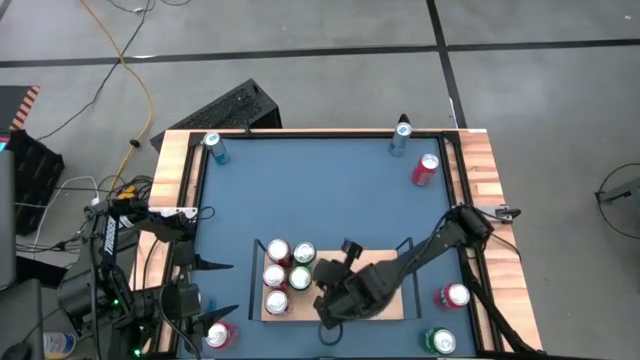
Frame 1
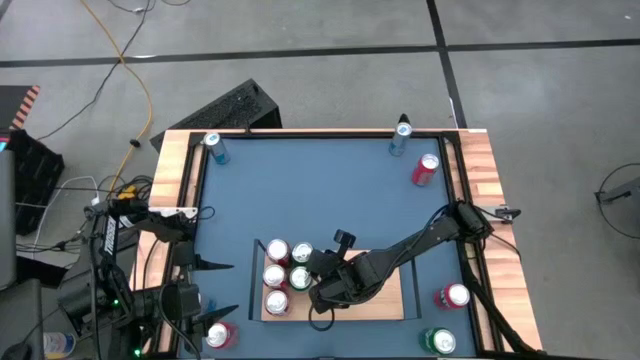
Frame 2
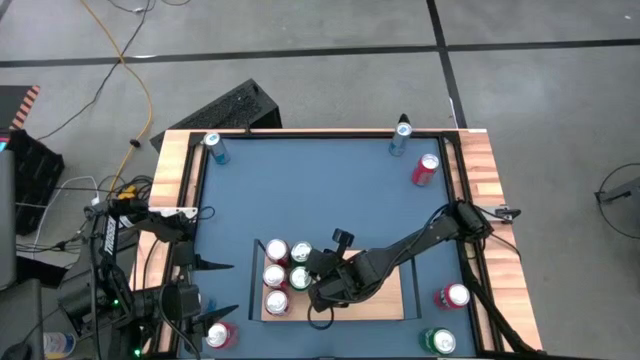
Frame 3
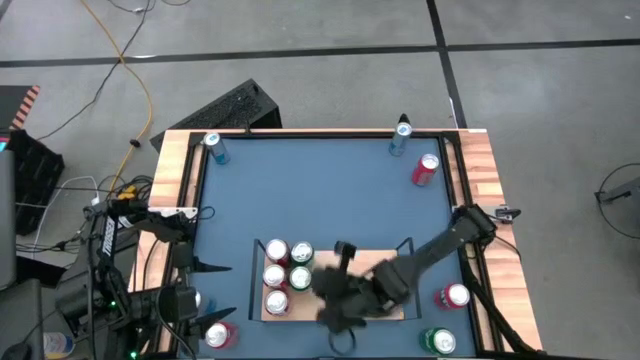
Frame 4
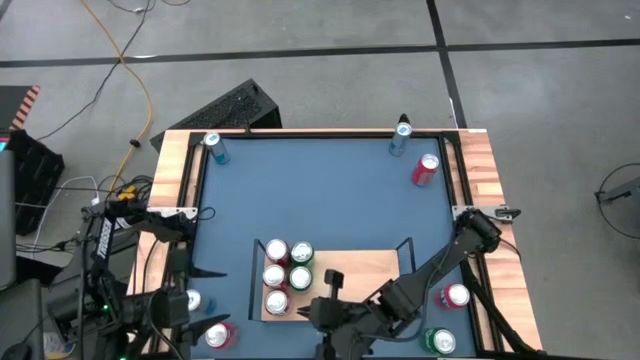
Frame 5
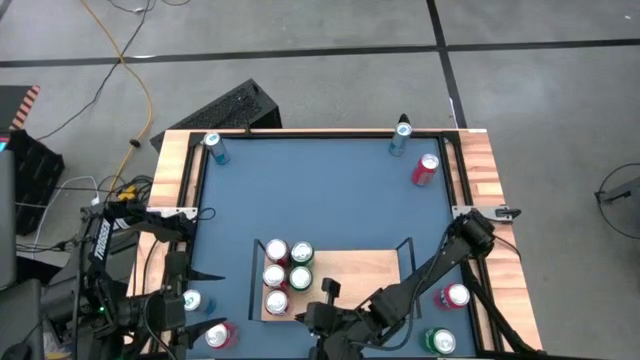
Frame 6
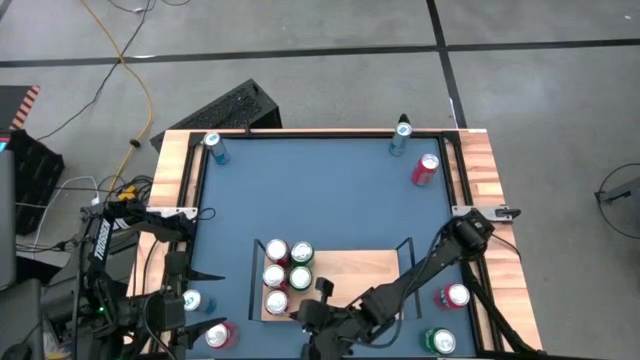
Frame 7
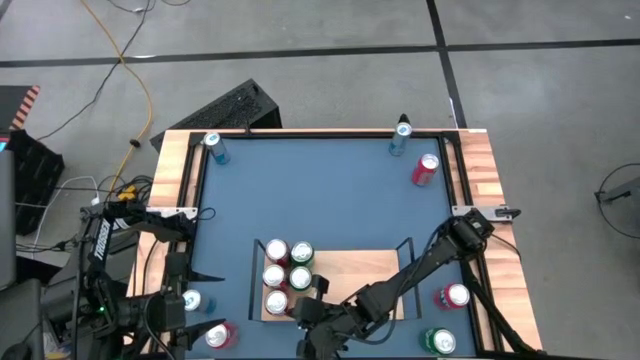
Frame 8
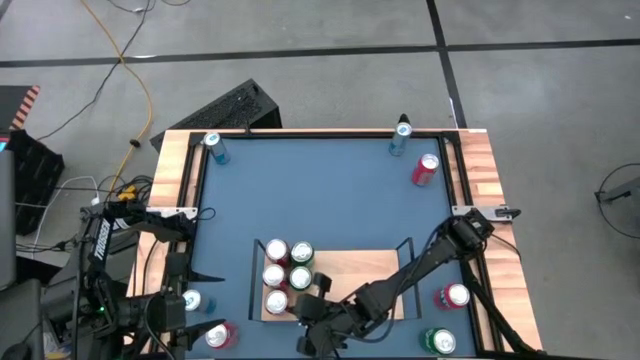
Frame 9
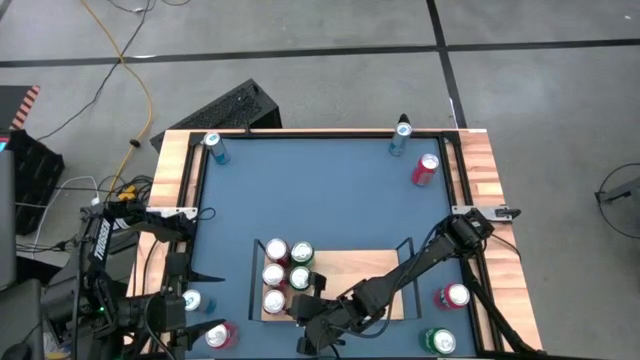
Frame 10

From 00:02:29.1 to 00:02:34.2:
Task: Place canned beverage on shelf
Adjust the soda cans on the shelf

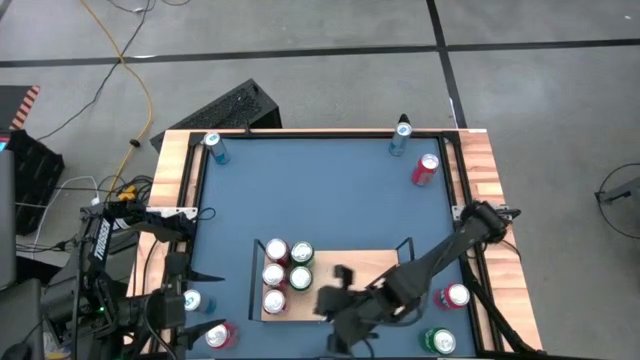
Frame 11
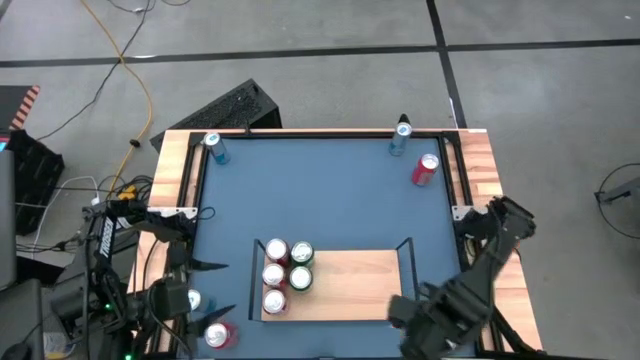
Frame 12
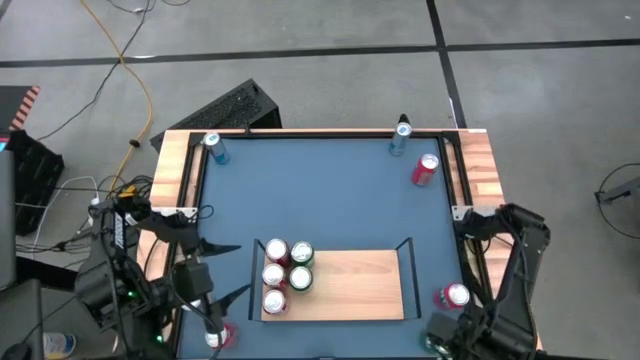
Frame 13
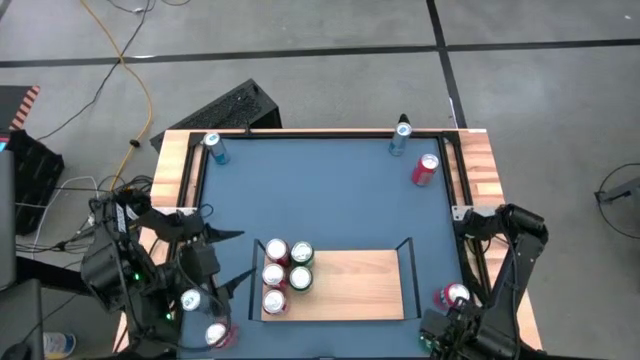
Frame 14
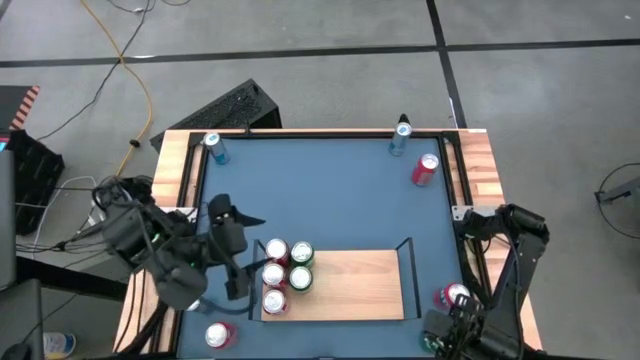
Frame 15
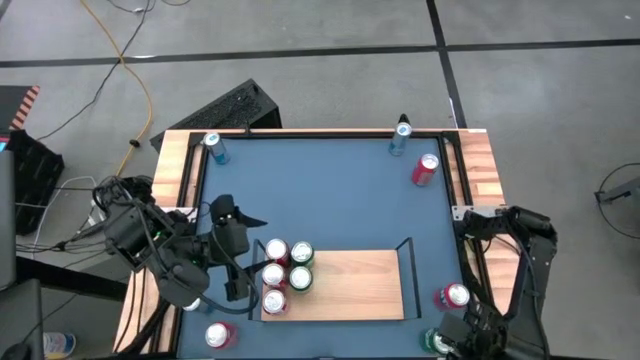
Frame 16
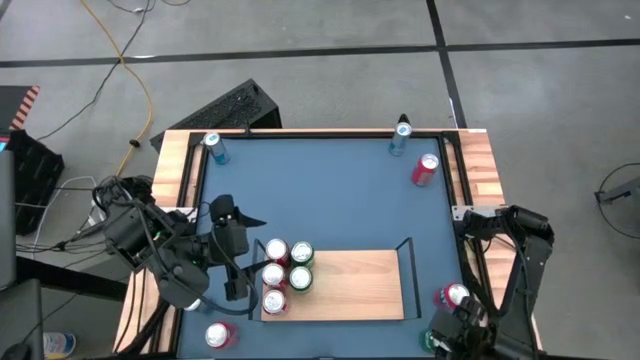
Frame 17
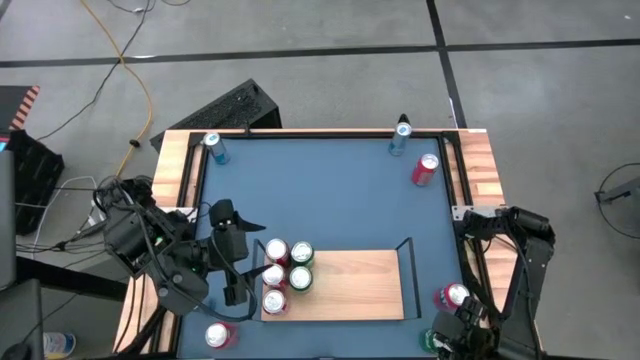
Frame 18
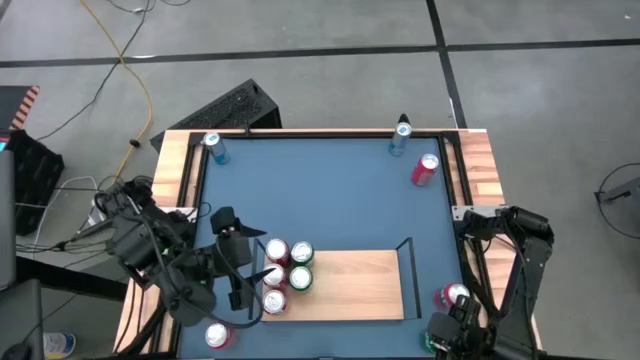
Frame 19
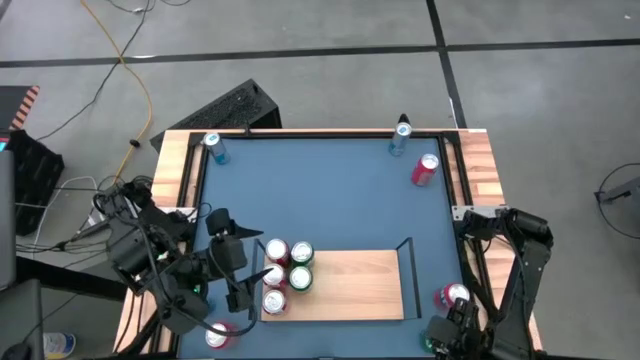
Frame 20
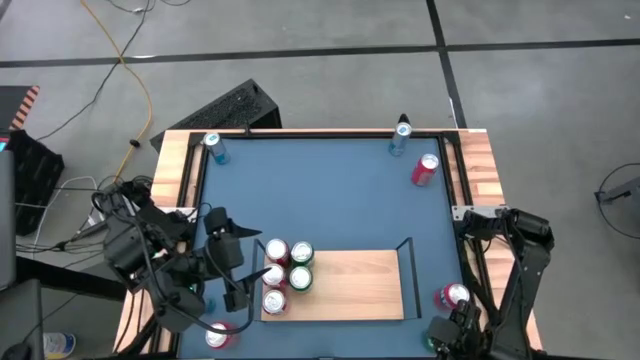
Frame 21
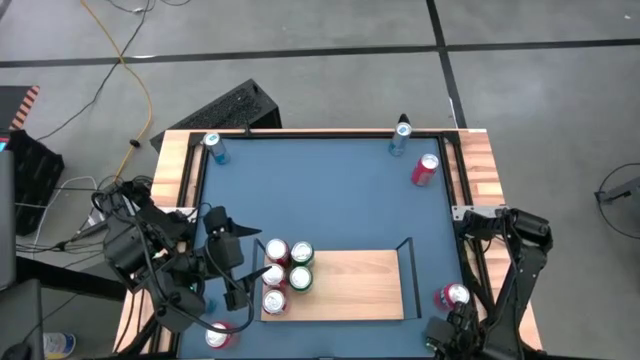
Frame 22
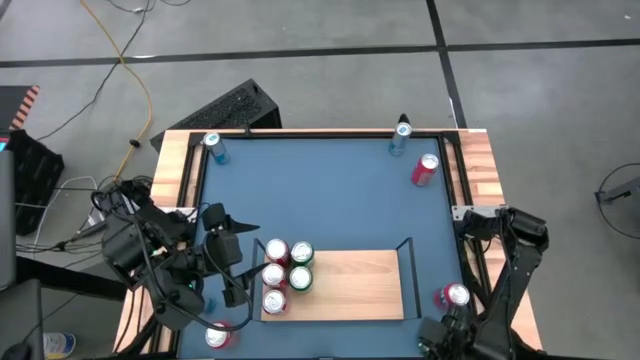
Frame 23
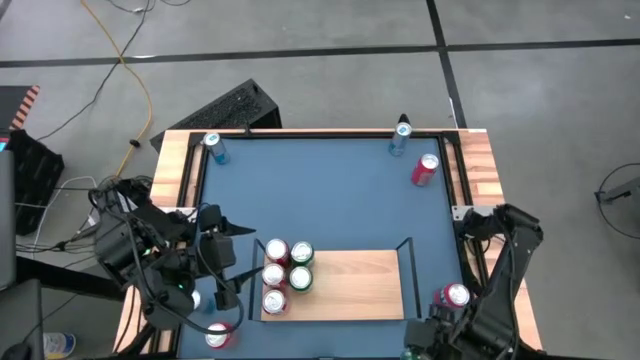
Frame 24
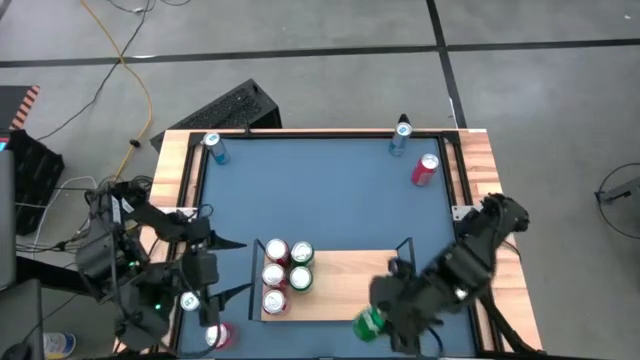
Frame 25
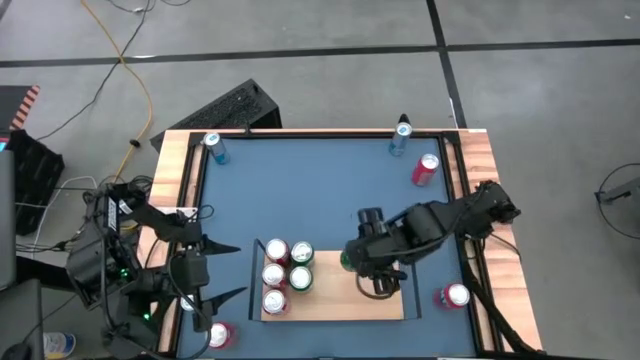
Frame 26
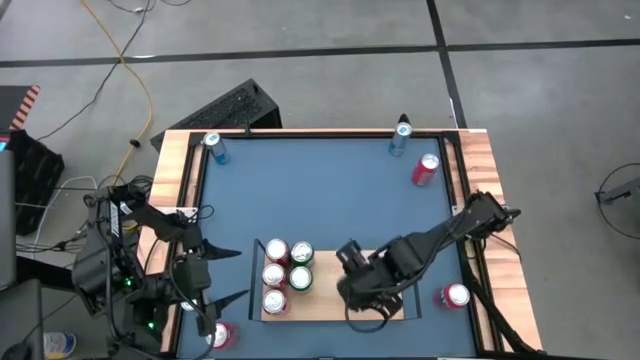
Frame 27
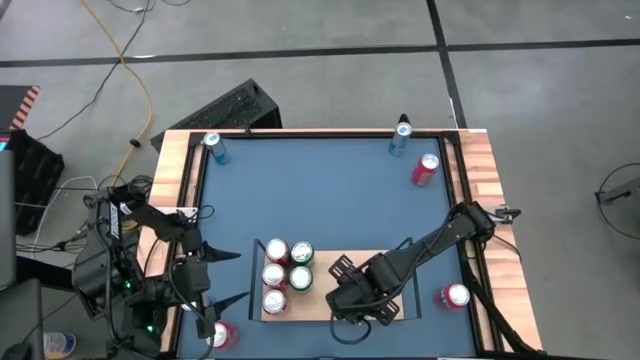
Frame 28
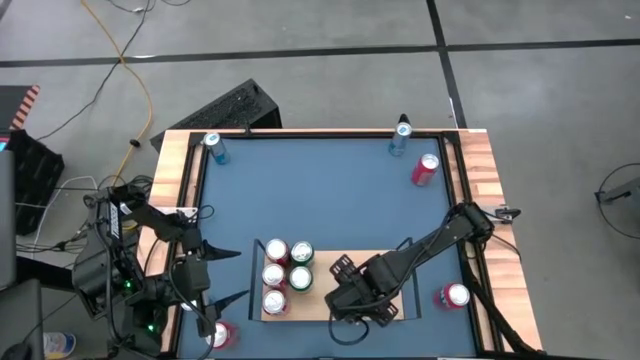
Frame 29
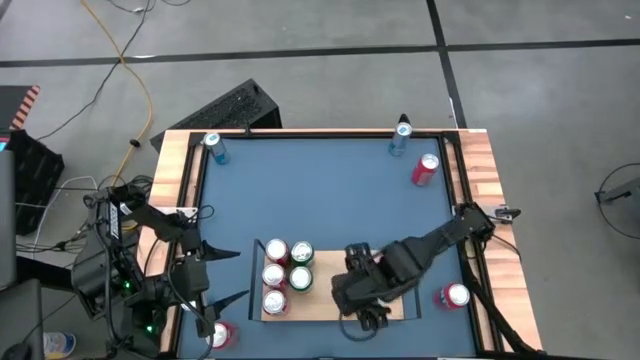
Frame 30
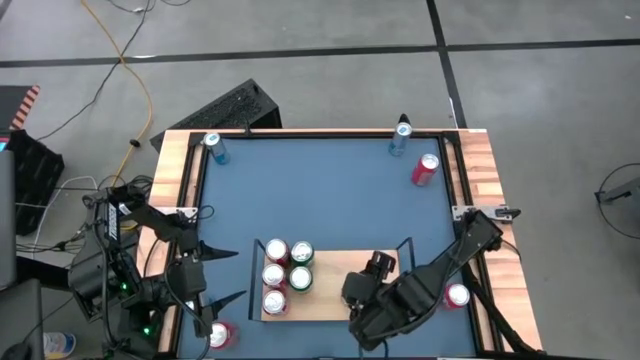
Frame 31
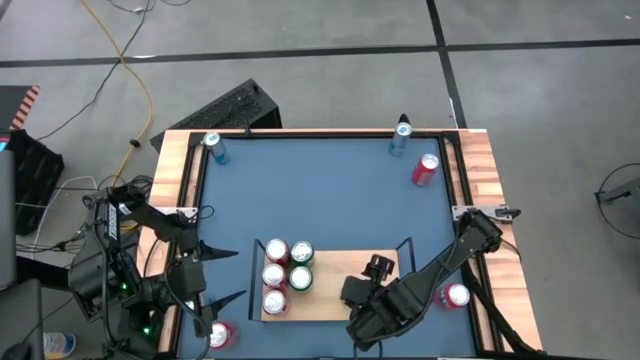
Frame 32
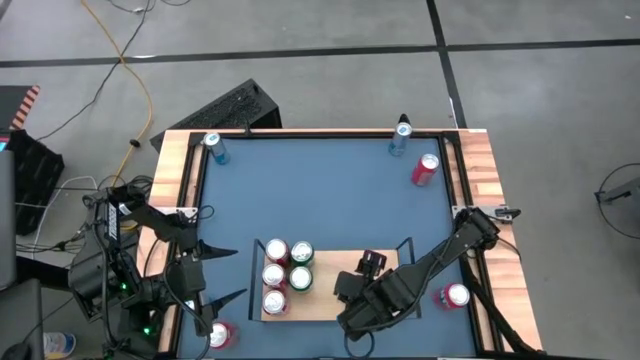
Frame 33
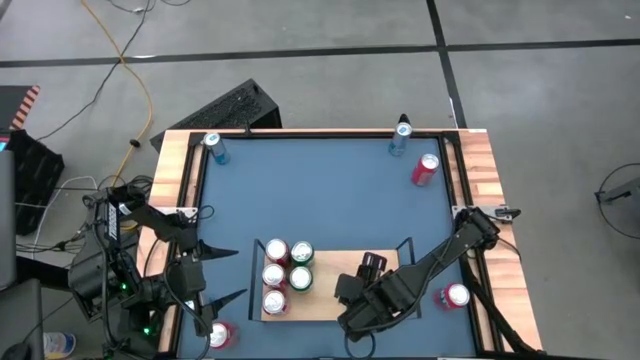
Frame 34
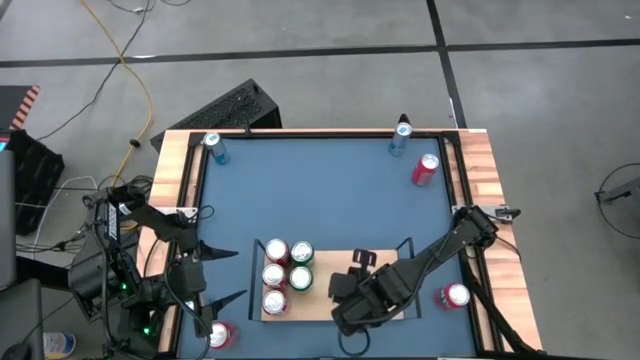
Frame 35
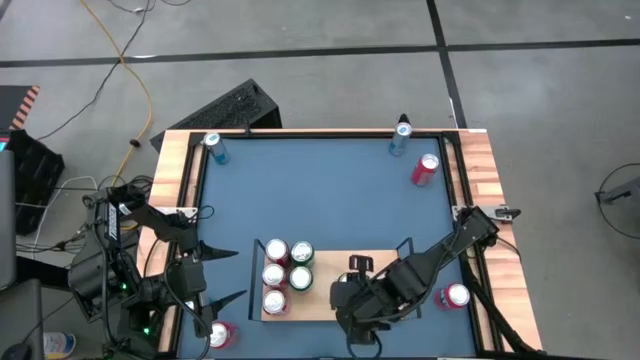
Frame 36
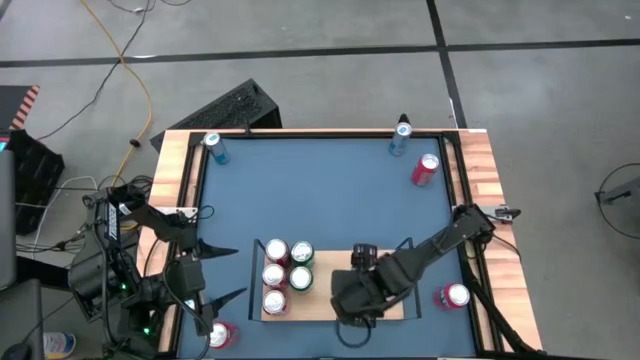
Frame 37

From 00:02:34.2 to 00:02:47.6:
Put the green soda can on the shelf aligned with the other green soda can

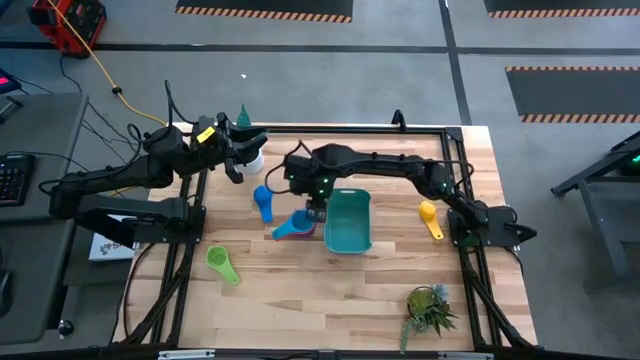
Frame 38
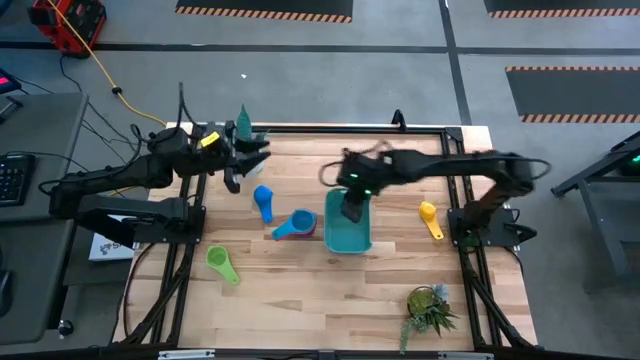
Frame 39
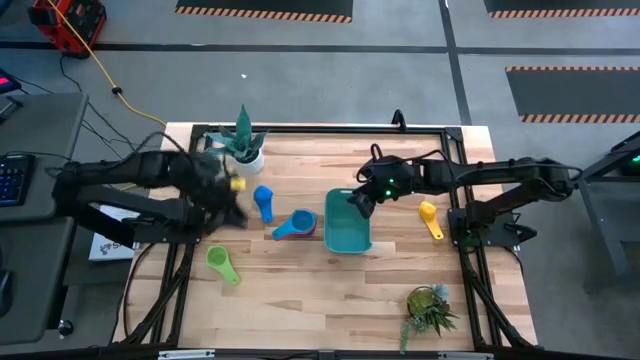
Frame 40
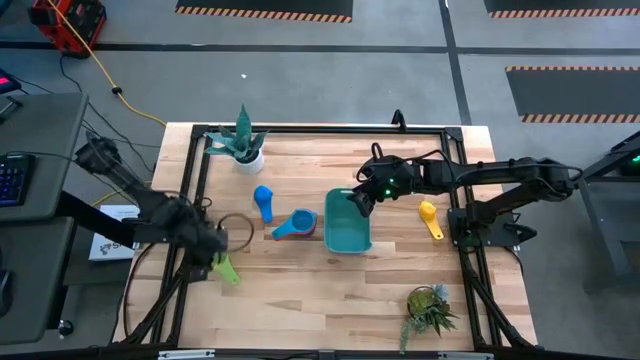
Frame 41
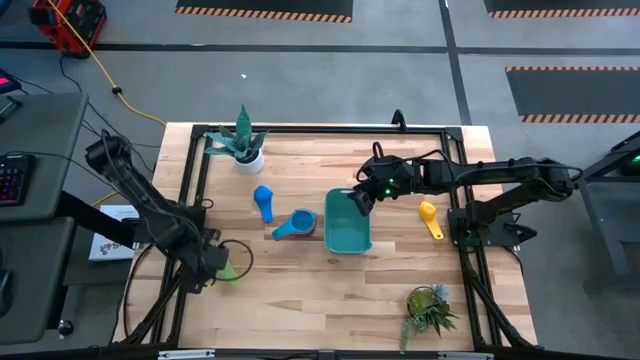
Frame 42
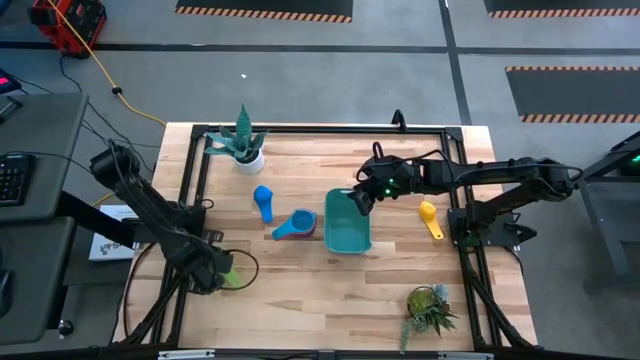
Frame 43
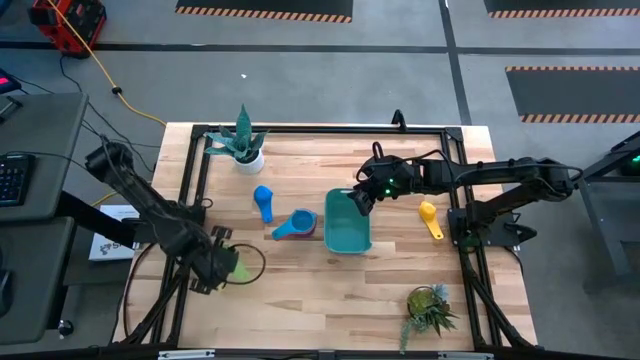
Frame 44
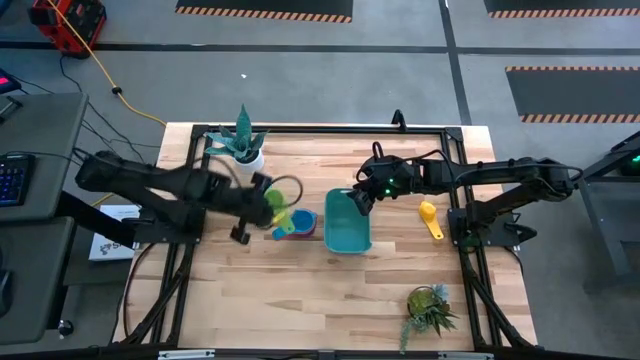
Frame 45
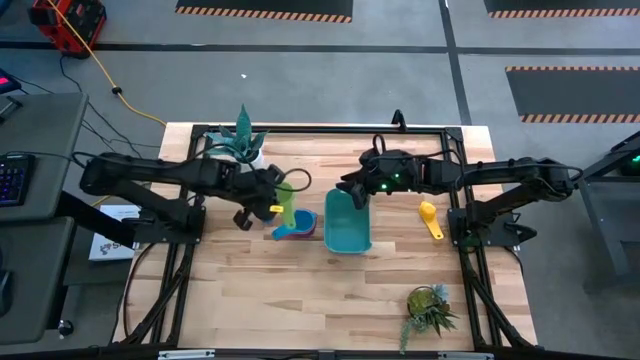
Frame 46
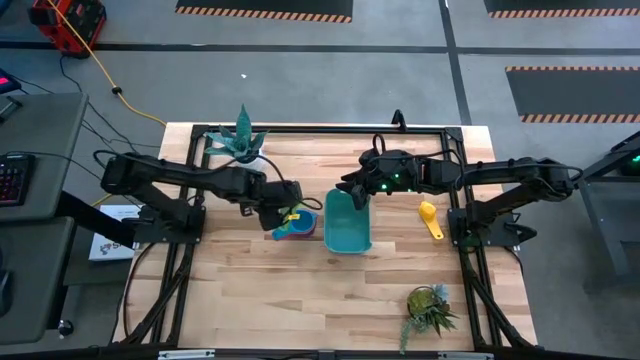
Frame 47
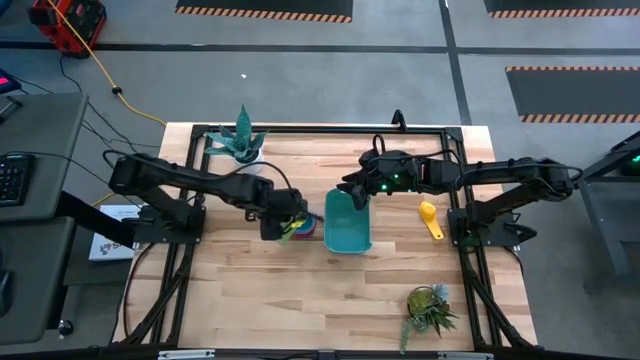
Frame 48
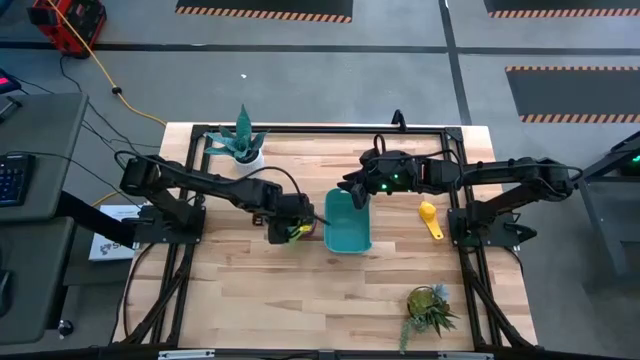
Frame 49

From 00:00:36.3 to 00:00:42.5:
Task: Nest measuring cups in basket
Stack the green measuring cup on top of the light blue measuring cup
